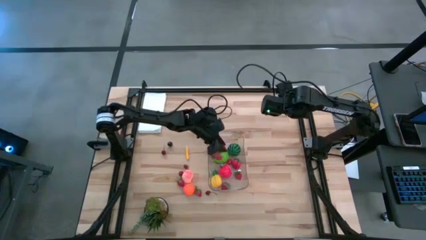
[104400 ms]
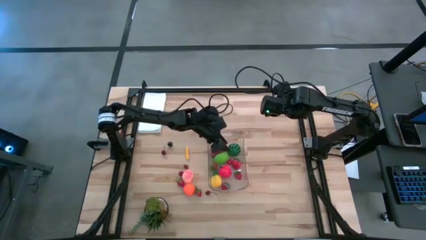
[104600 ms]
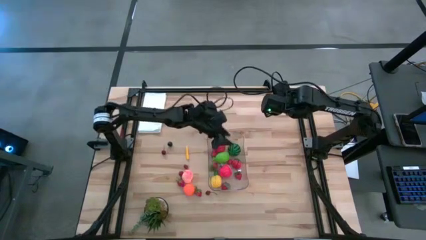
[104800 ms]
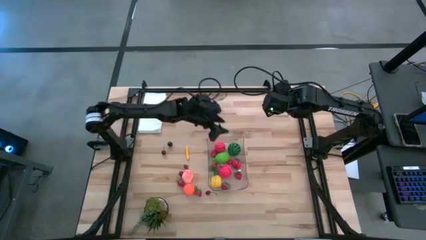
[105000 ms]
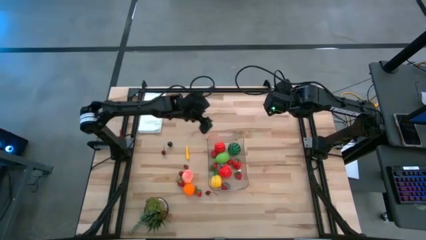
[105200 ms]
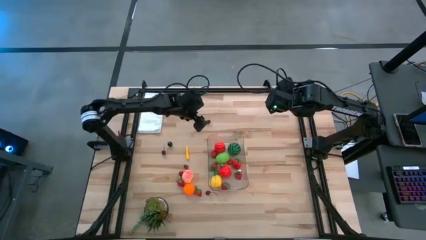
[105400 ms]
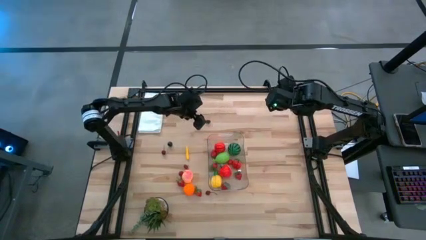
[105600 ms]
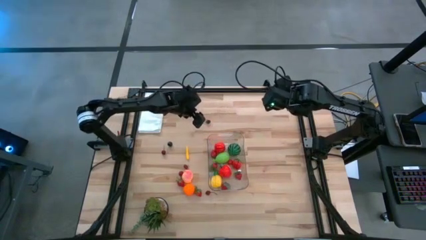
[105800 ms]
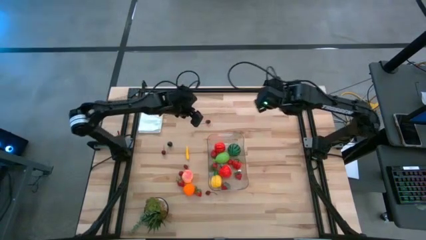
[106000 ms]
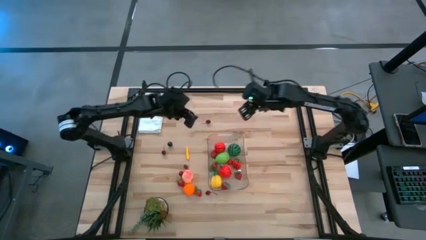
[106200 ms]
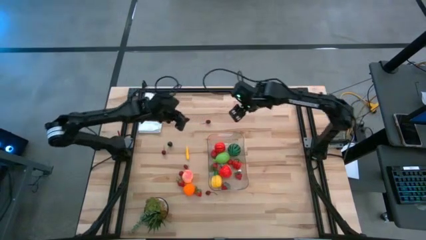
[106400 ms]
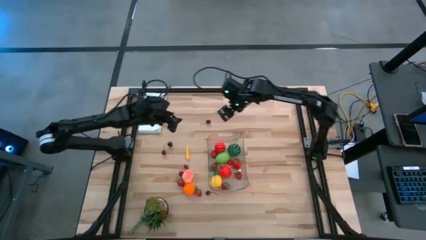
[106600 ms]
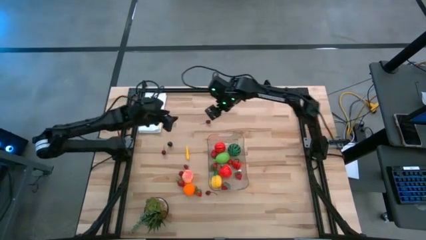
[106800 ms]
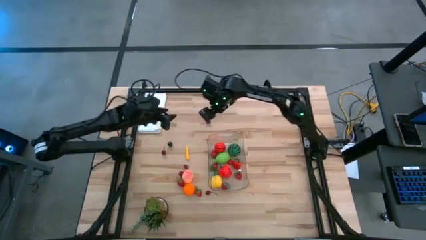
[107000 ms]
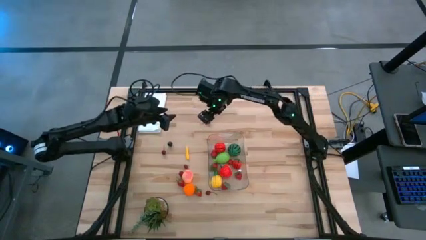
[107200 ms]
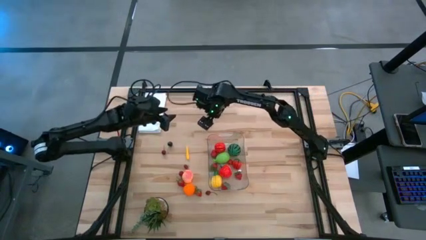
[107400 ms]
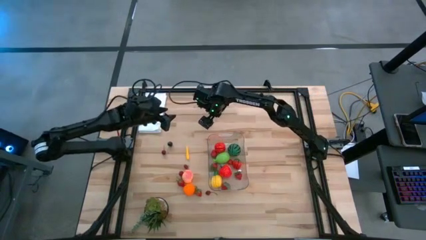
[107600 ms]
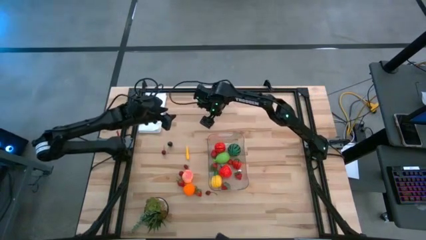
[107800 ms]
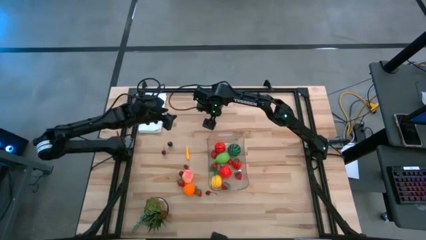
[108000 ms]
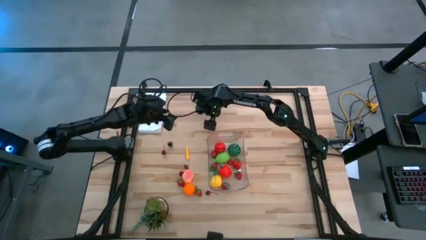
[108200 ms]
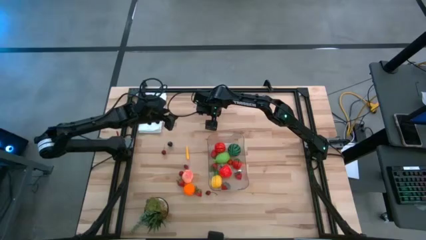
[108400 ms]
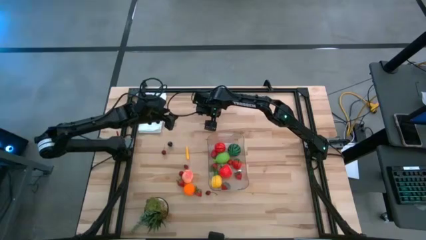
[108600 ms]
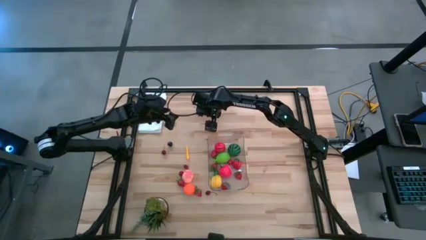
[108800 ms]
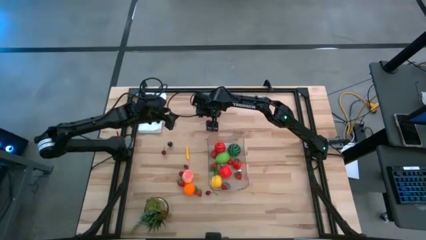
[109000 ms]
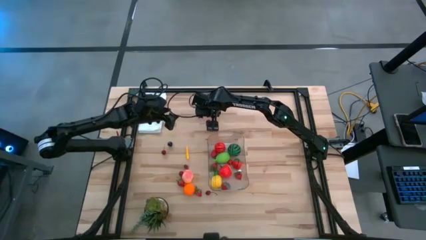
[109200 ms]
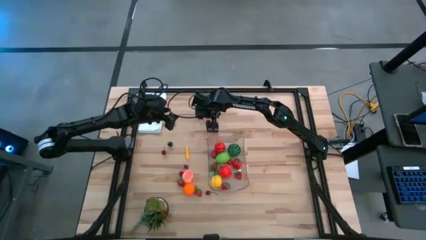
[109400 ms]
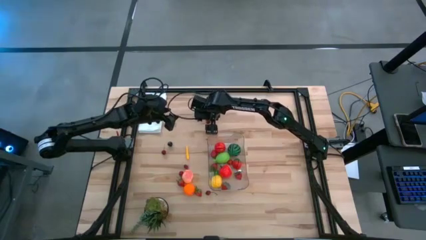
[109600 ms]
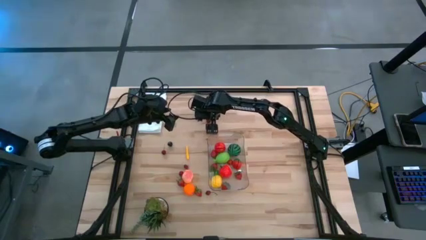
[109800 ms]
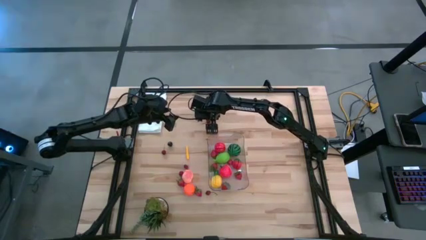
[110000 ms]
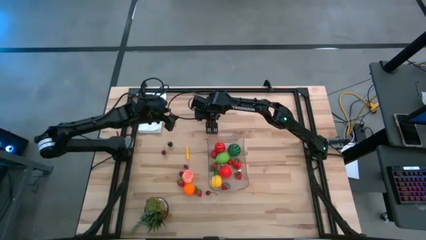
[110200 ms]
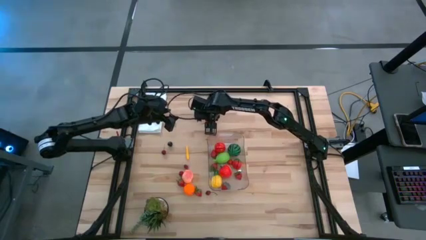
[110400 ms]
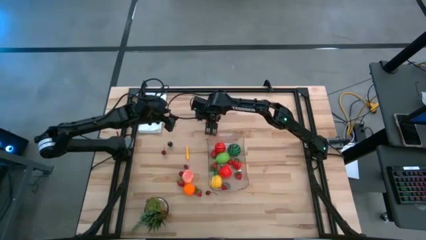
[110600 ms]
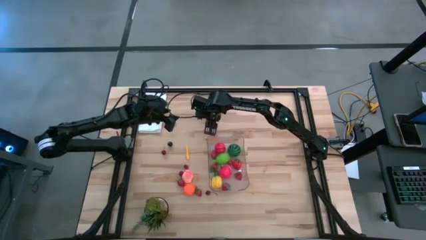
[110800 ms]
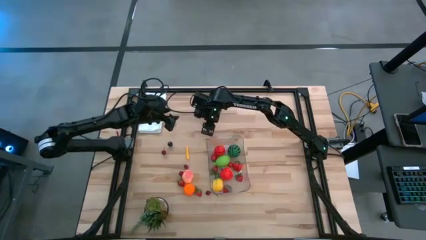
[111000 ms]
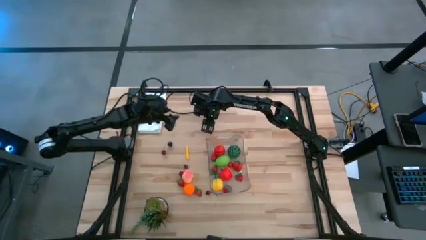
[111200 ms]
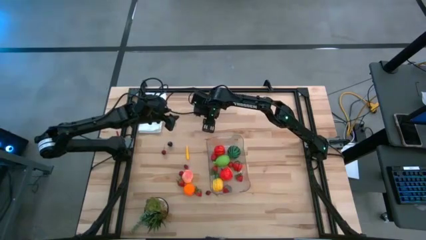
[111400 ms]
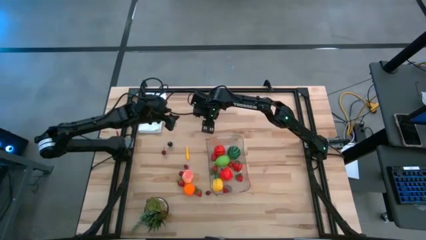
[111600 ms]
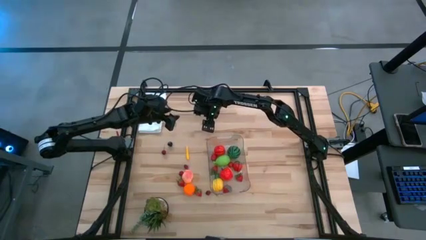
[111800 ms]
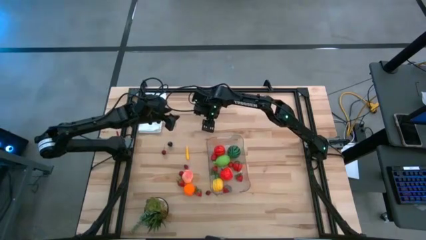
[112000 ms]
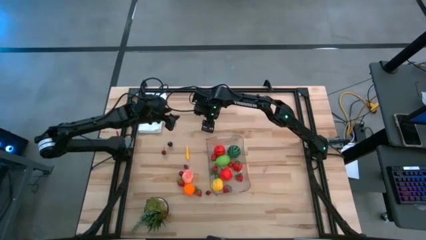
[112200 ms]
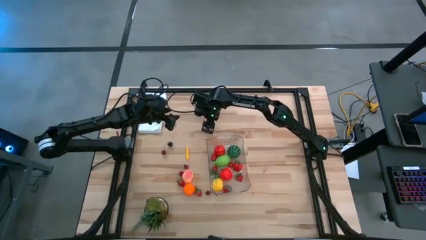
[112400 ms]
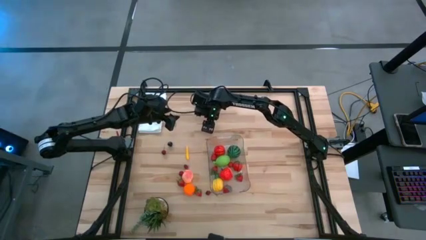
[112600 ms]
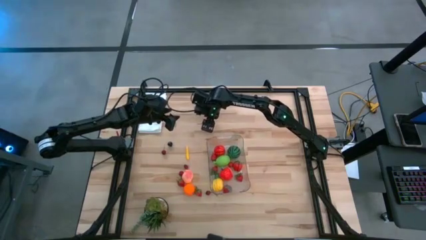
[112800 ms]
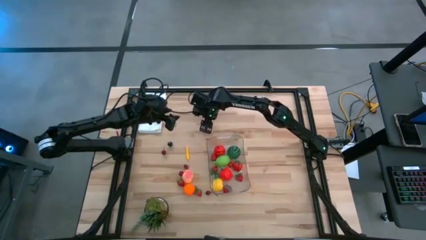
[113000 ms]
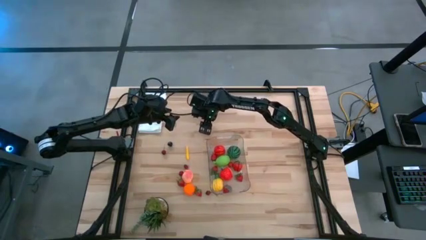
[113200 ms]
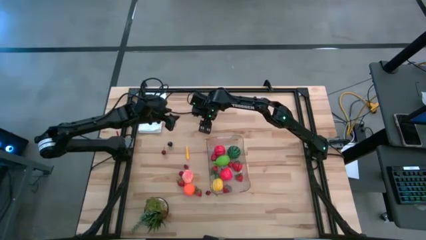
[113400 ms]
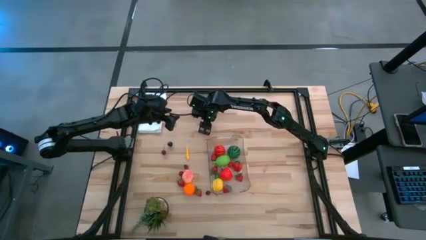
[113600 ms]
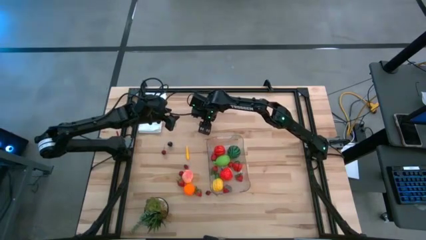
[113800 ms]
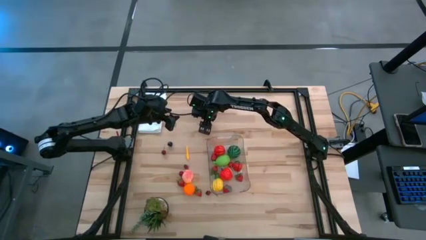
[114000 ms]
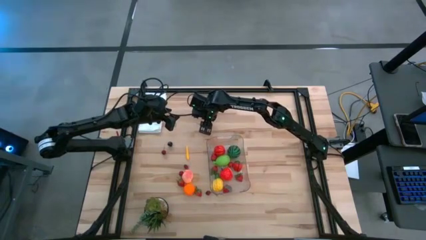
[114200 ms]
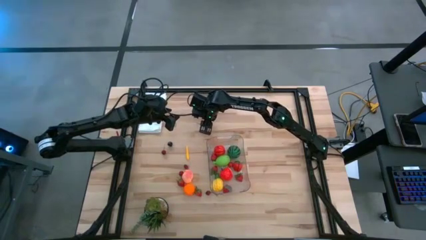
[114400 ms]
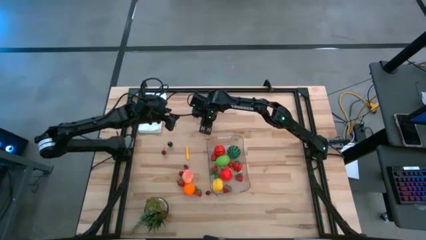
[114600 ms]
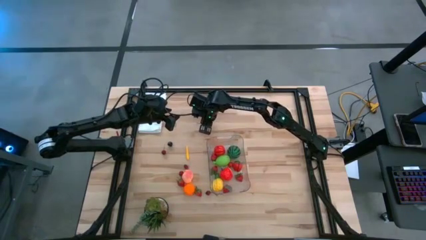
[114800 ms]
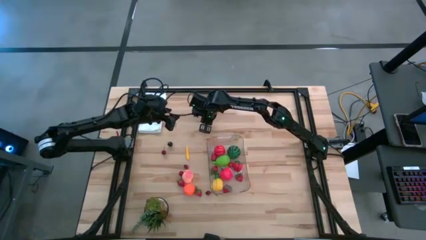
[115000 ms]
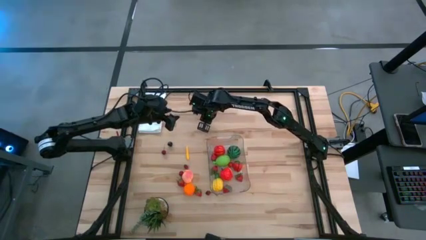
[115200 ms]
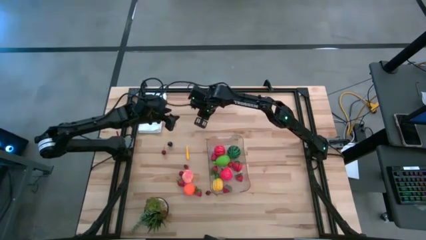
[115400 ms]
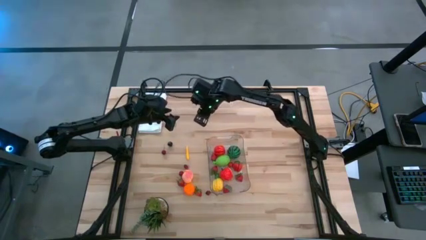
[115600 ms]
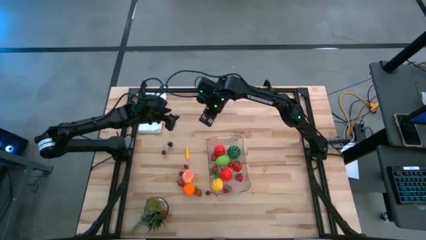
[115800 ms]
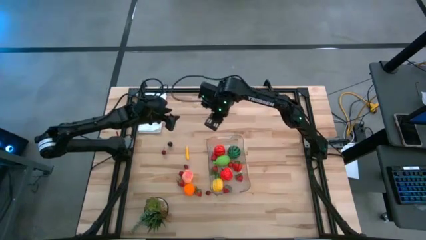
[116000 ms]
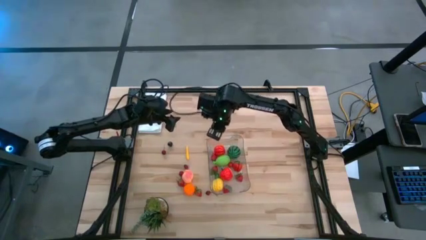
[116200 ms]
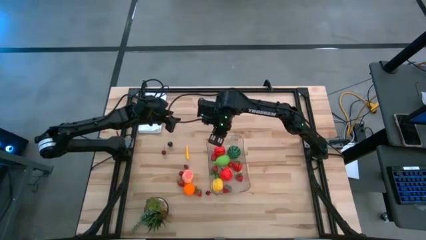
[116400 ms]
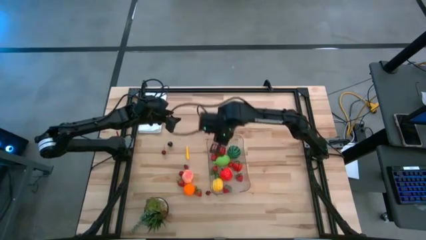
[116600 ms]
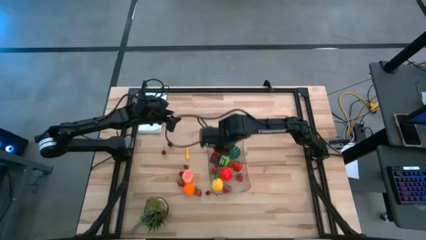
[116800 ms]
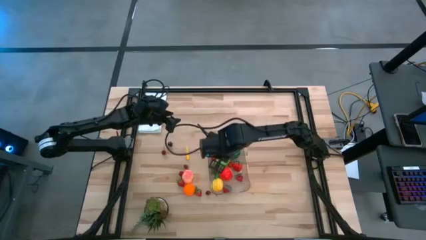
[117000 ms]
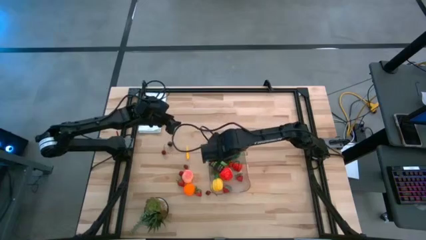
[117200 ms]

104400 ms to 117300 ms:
Task: Pick and placing Produce into tupperware
Put the red cherry into the transparent bin

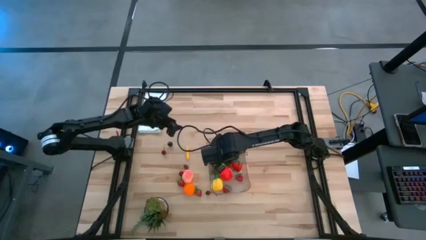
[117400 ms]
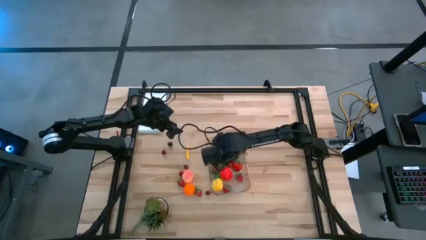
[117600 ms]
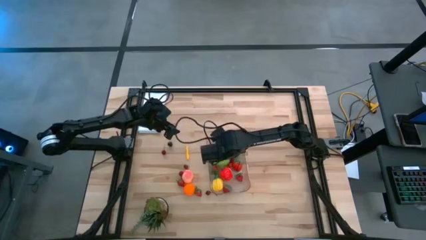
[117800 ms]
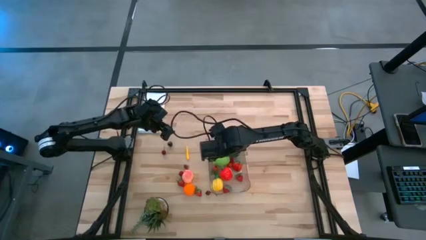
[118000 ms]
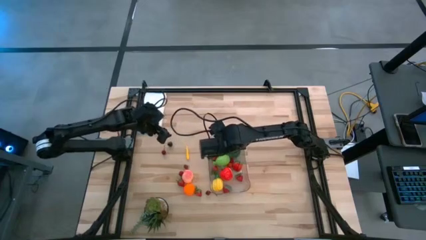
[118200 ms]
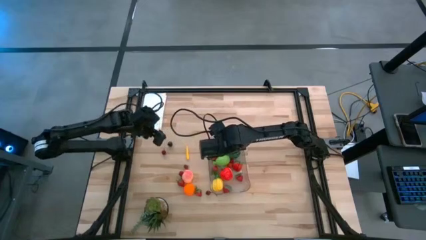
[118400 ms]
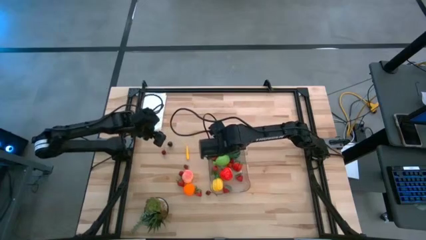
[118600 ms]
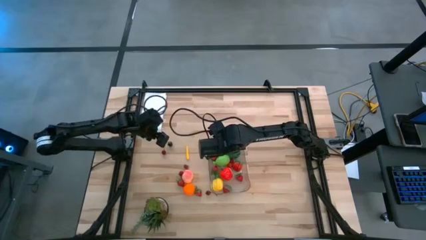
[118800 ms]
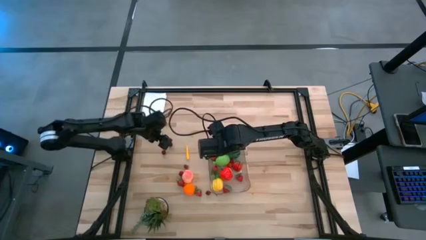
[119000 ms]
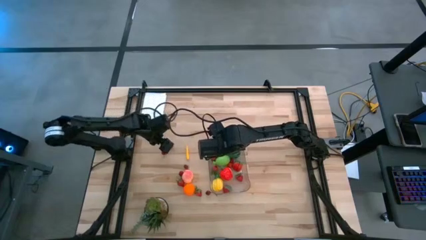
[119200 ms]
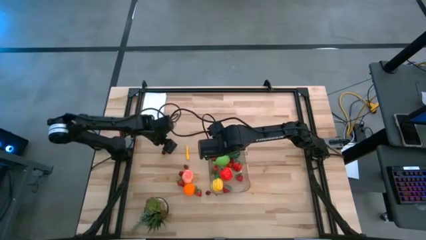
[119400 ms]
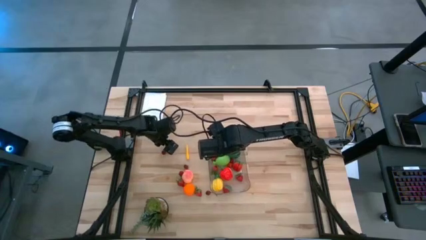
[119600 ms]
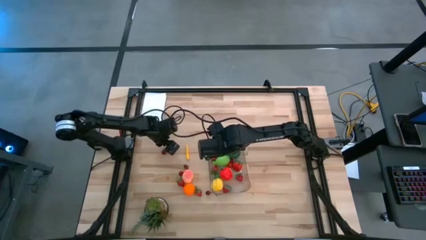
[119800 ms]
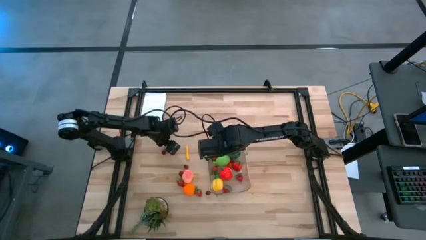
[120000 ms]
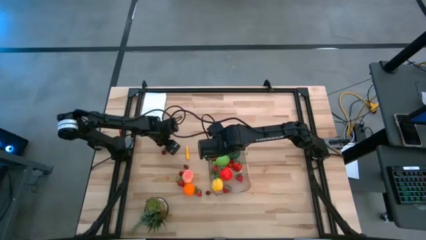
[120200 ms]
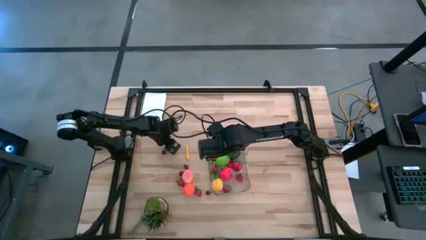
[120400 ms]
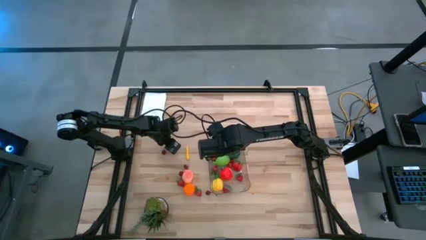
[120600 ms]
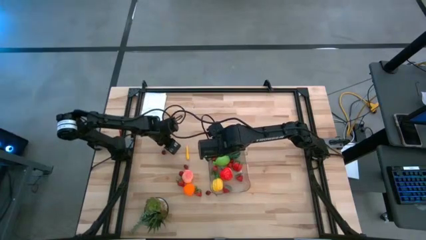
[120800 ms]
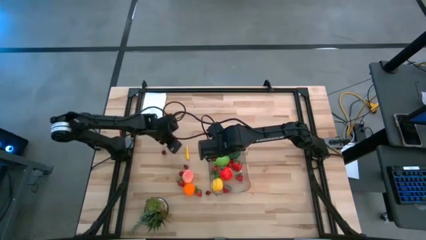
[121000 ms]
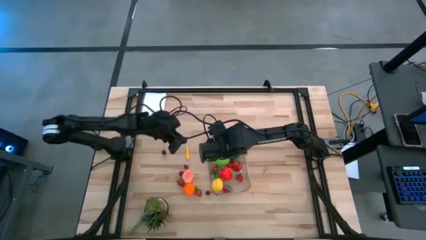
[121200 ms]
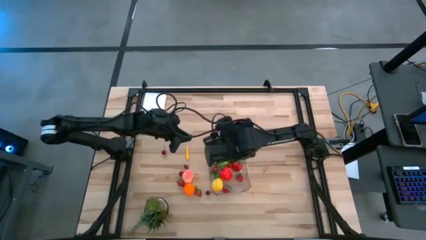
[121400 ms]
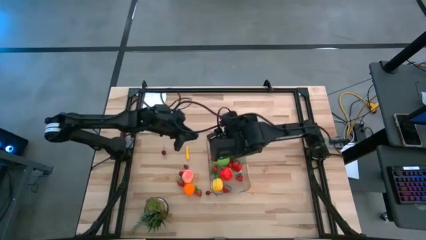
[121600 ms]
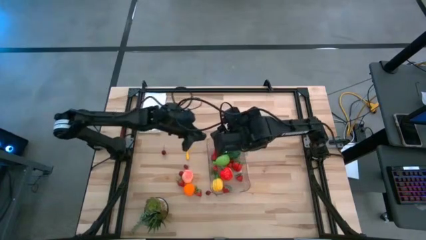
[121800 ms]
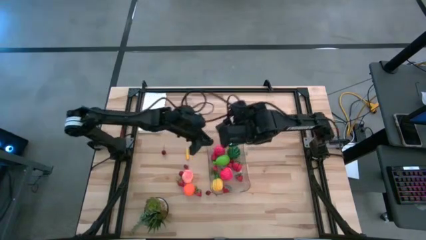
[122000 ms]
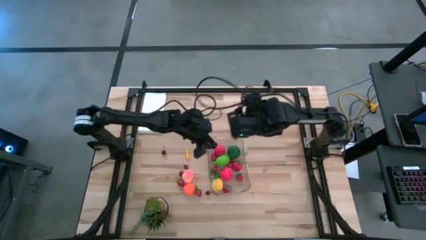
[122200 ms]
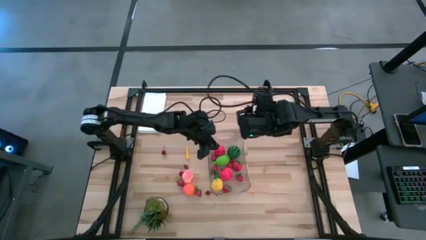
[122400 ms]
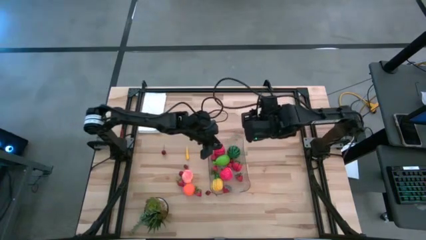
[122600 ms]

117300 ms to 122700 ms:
Put the black cherry into the transparent bin
